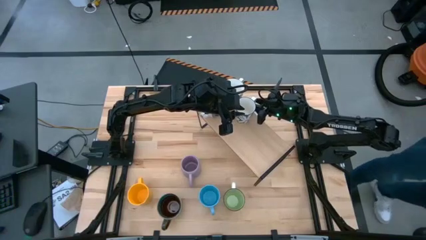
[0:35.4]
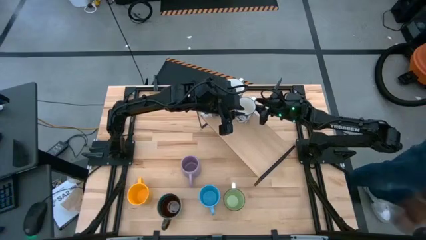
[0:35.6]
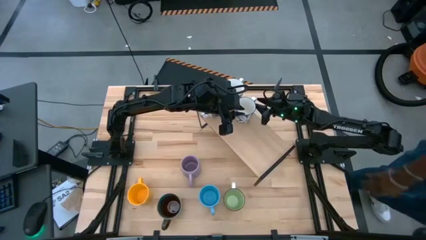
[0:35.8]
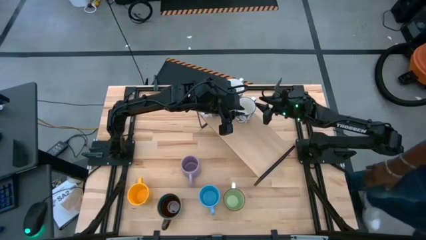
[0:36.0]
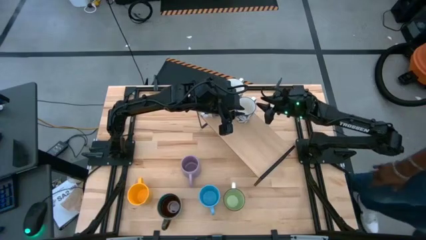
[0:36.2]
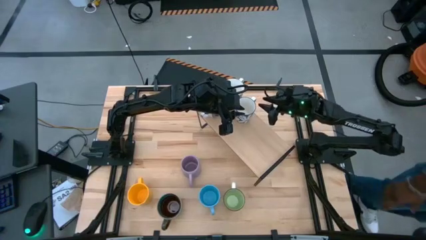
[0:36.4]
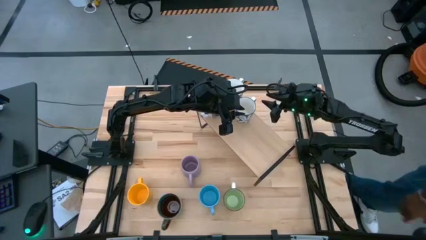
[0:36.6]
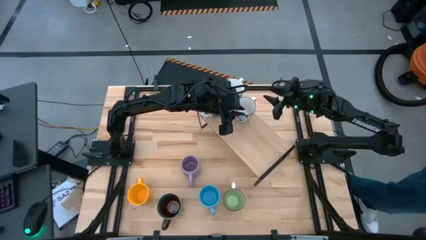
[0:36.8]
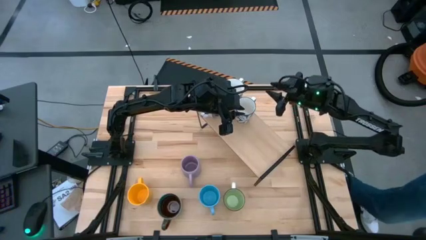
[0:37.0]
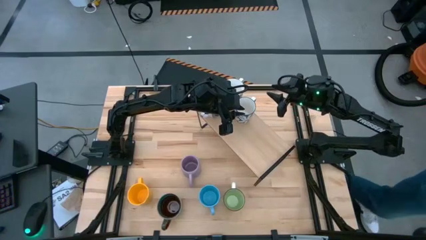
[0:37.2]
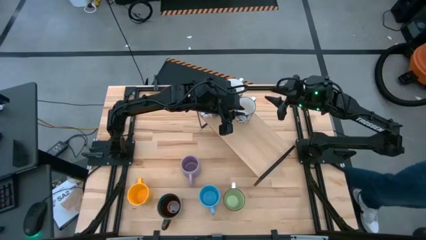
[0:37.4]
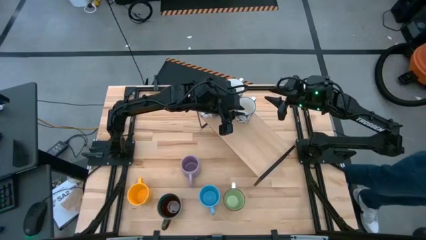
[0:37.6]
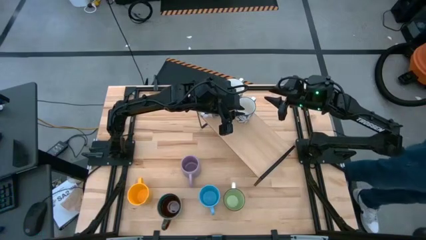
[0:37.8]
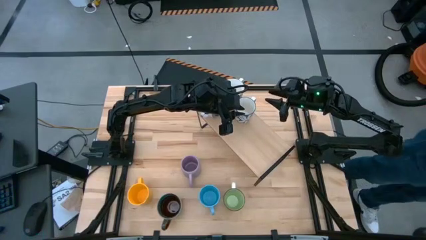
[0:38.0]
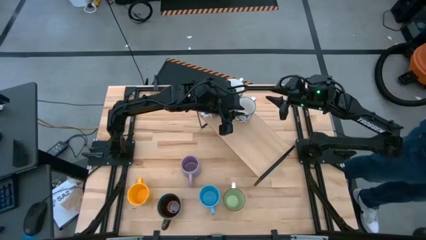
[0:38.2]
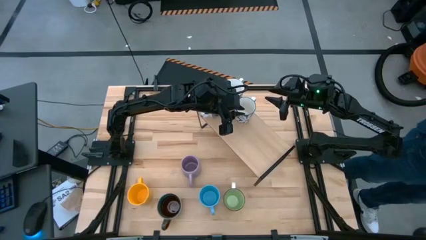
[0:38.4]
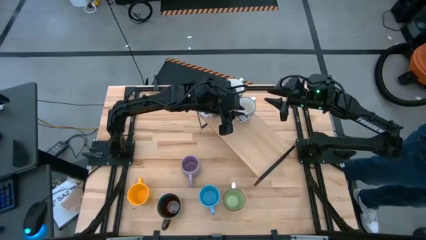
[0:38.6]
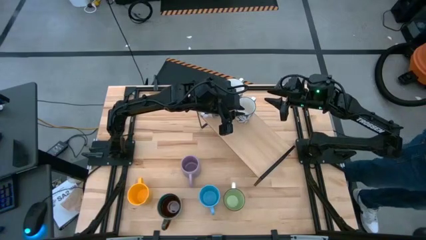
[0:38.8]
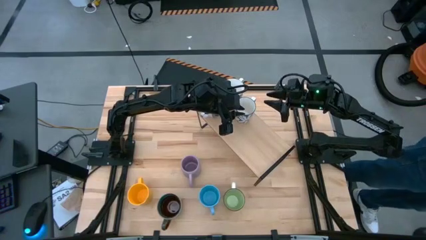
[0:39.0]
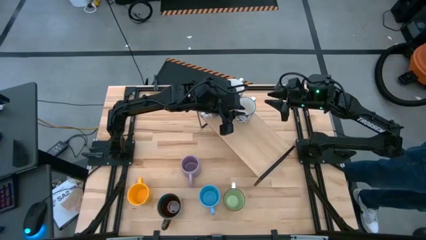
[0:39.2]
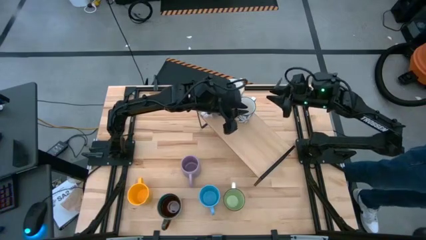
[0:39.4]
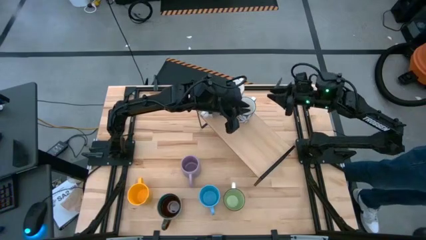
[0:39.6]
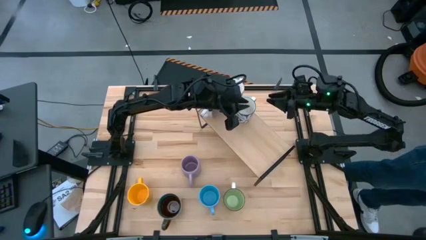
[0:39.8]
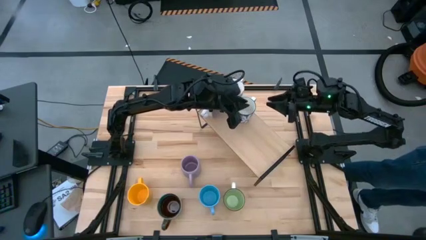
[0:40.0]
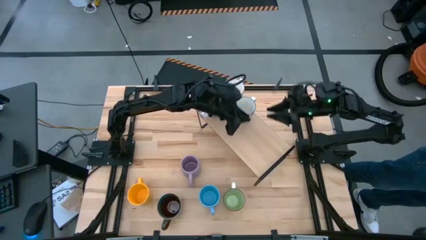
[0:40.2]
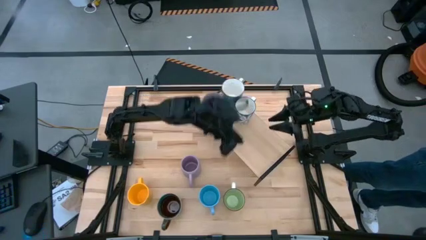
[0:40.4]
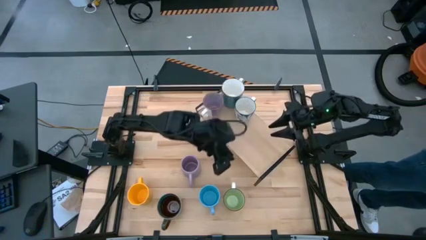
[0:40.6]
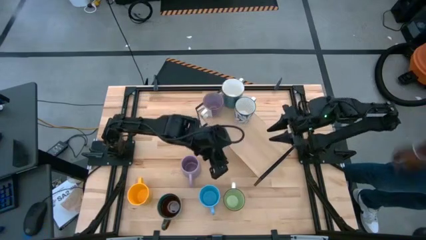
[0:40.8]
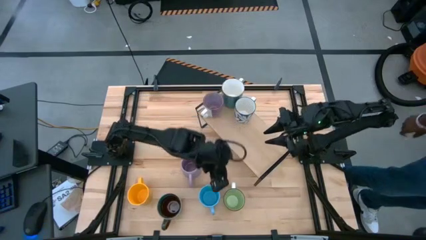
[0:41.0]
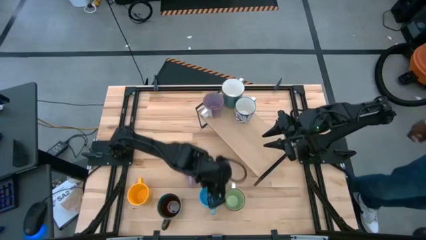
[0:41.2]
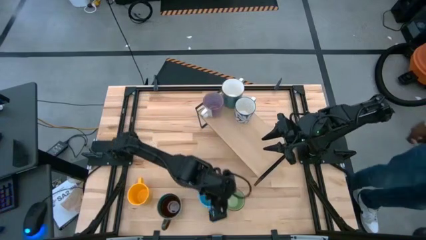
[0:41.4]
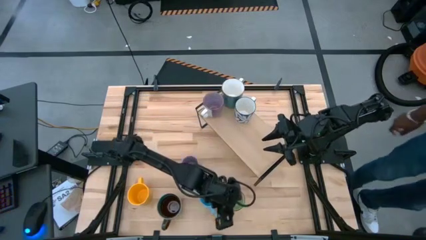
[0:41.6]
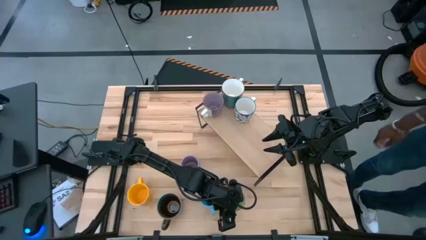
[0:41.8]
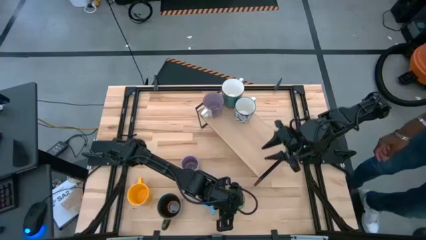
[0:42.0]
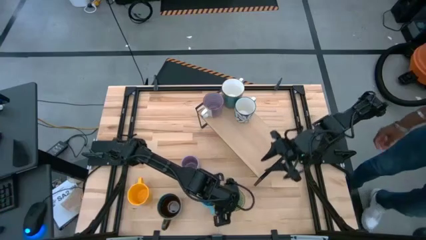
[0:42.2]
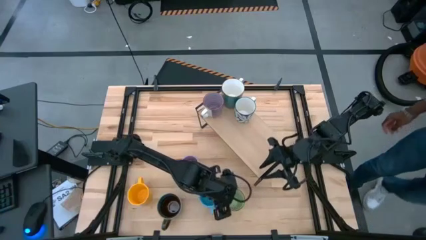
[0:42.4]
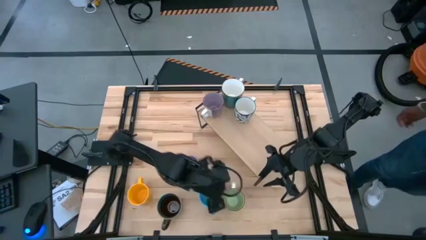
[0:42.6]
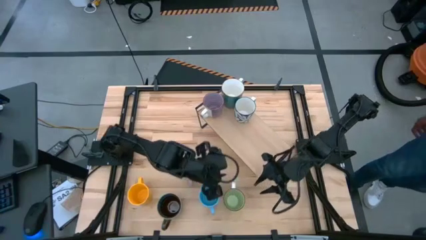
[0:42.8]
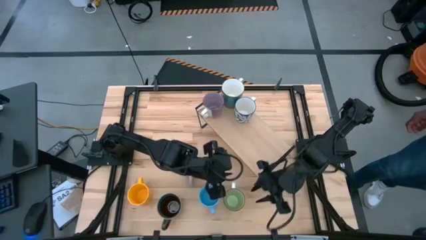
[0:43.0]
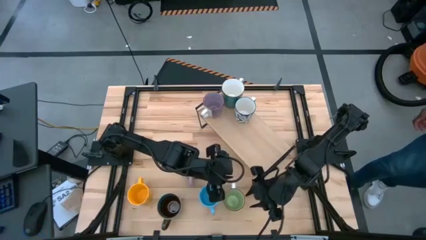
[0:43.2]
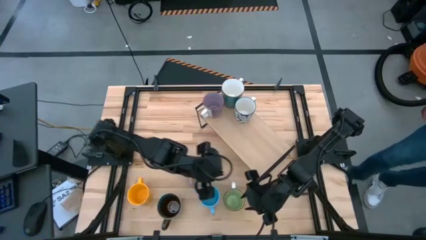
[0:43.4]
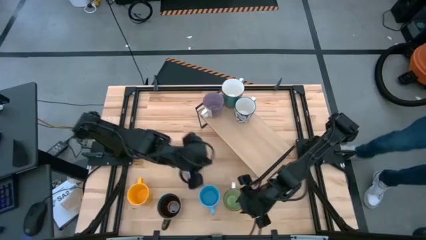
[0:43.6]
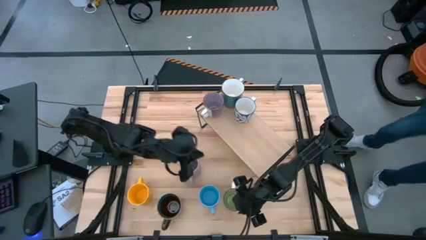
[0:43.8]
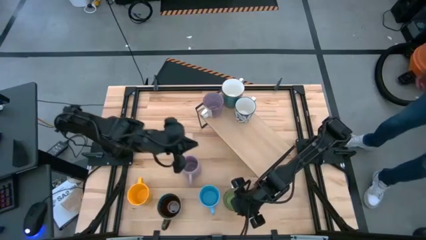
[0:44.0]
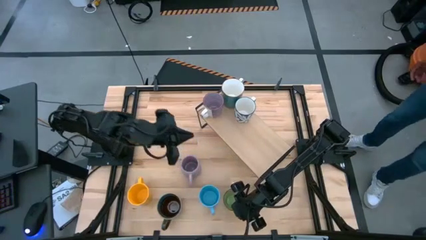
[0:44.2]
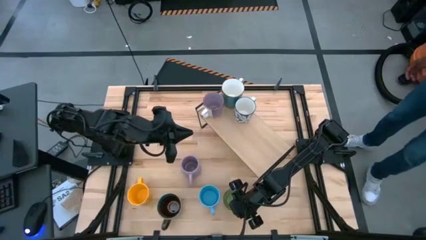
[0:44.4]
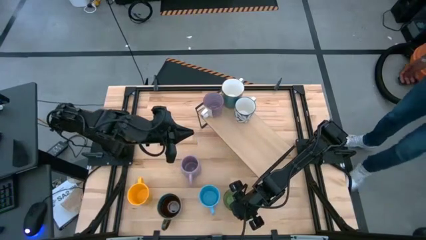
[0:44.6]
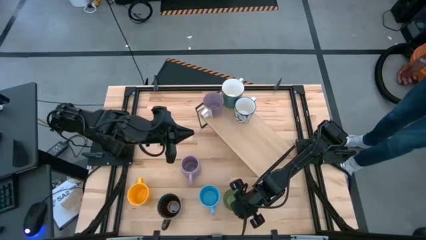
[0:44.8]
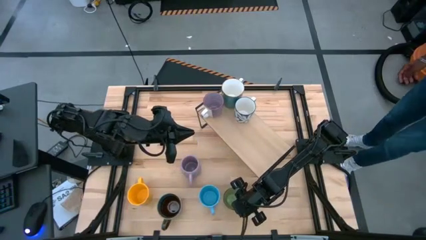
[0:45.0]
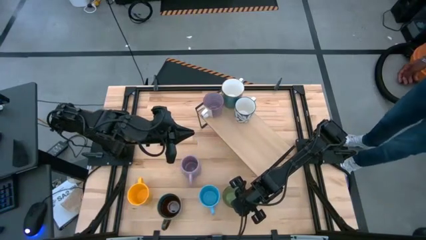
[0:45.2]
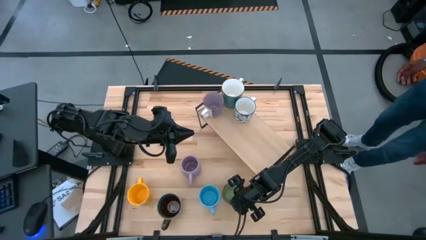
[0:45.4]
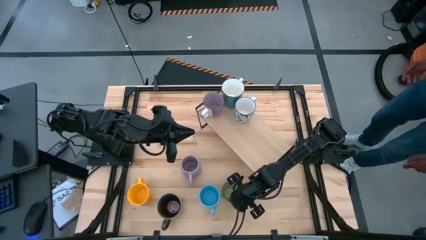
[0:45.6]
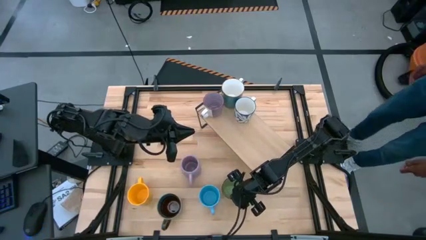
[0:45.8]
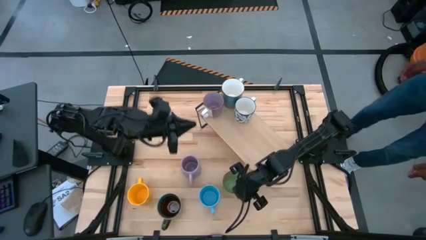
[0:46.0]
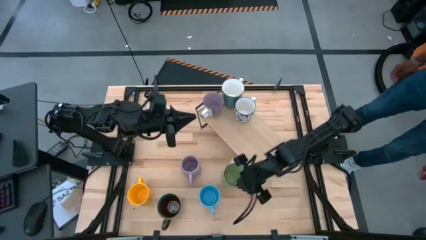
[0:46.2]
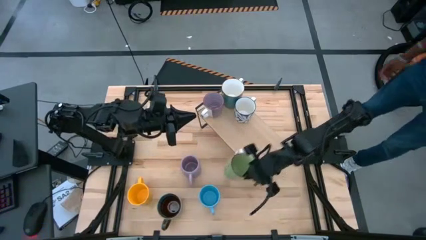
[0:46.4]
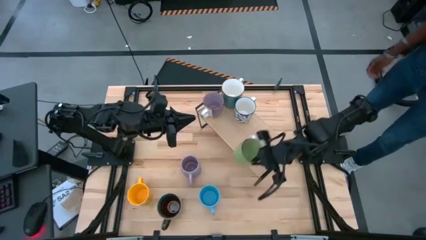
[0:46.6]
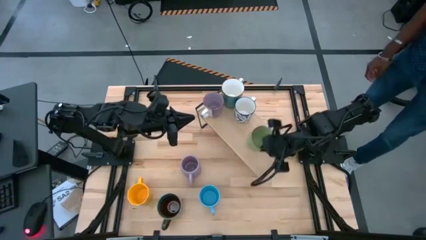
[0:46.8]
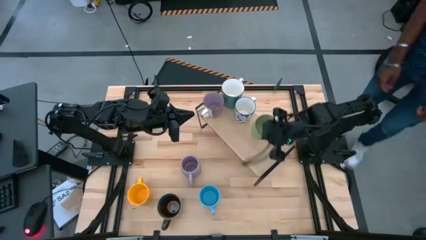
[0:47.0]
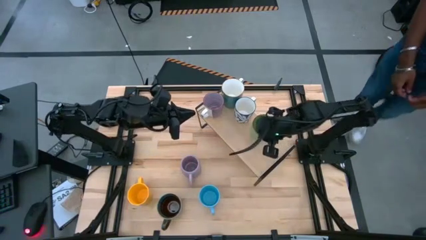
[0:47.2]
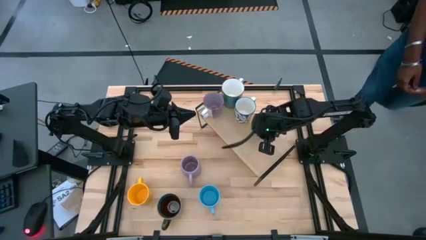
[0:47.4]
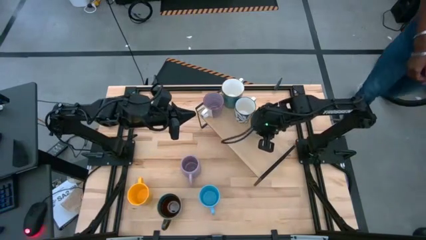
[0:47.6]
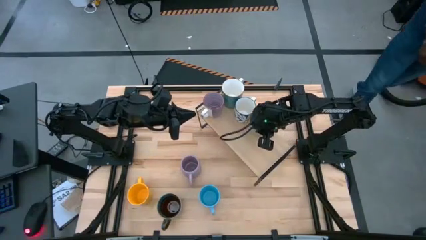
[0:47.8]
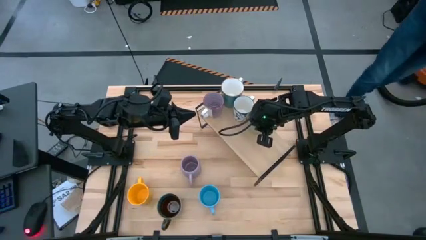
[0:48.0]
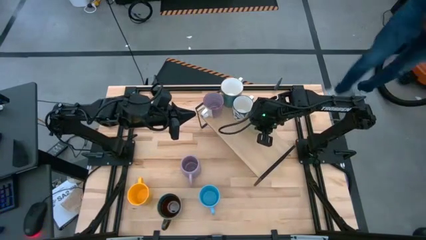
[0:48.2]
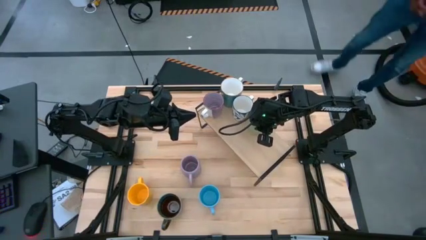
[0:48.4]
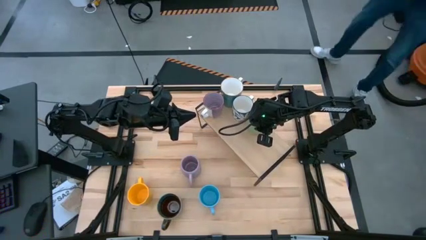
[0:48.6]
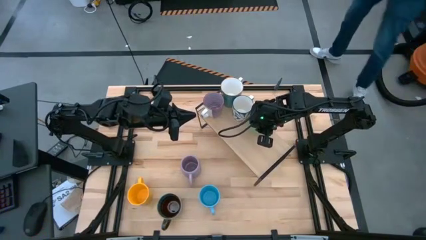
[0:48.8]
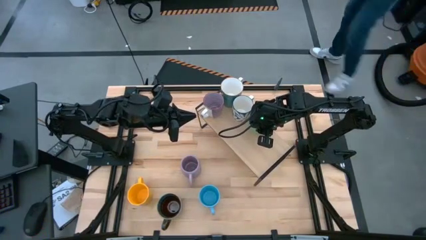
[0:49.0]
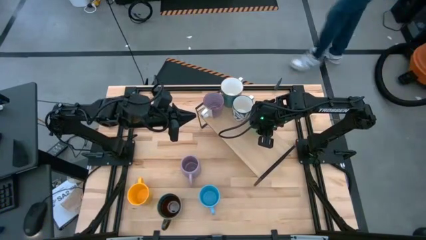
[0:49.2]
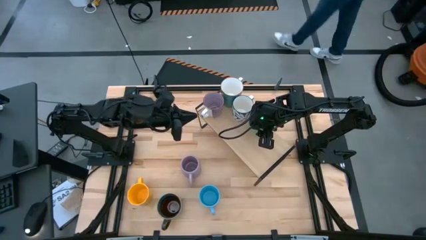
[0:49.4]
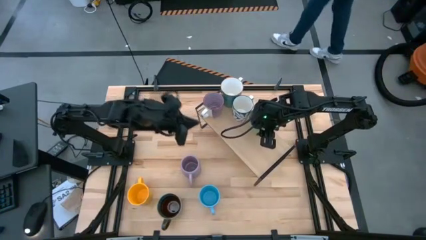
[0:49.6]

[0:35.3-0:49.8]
Task: Place coffee mugs
Put the green mug on the shelf
